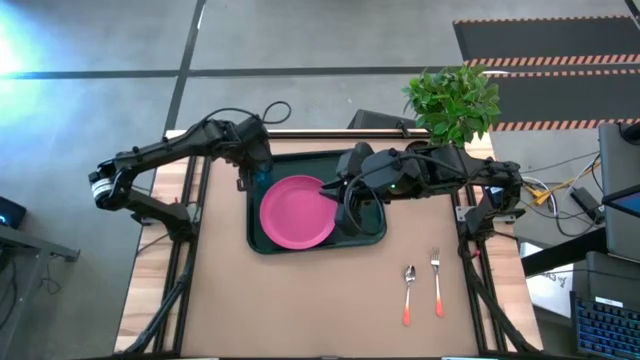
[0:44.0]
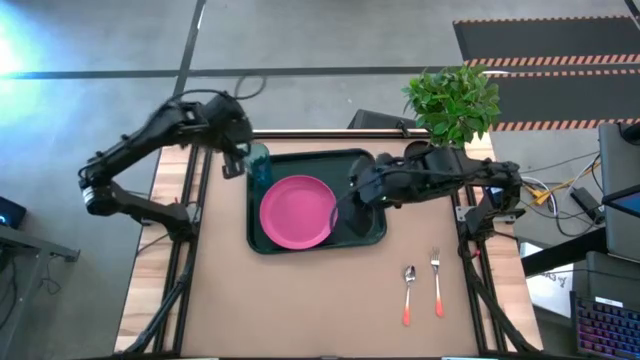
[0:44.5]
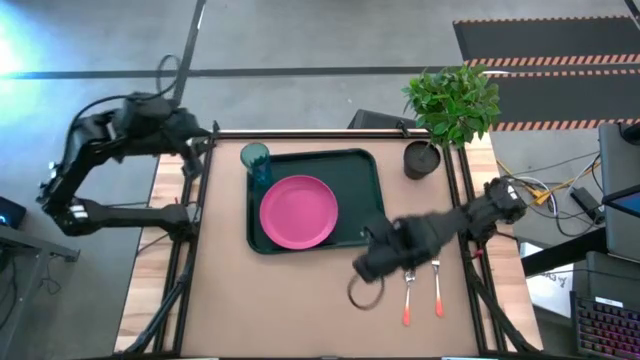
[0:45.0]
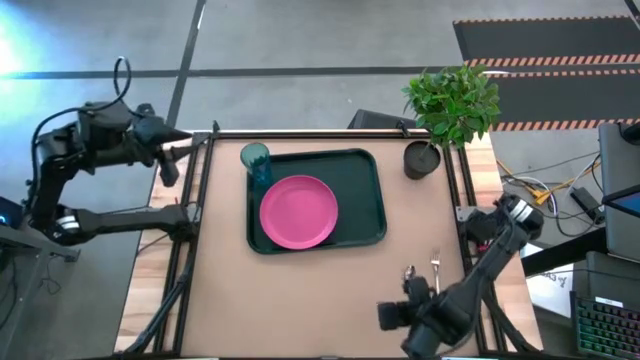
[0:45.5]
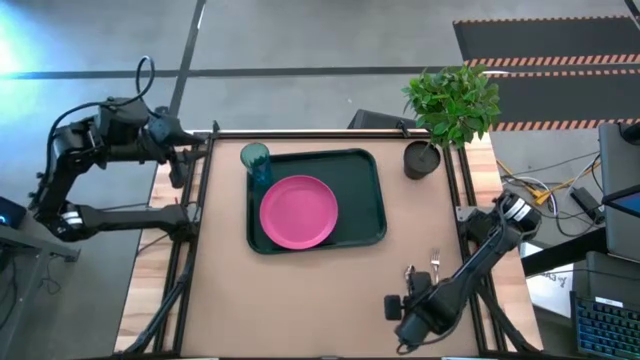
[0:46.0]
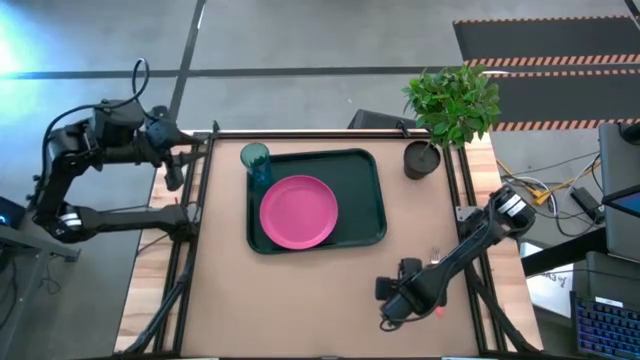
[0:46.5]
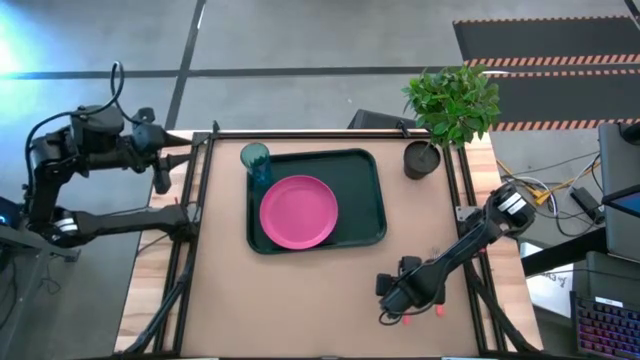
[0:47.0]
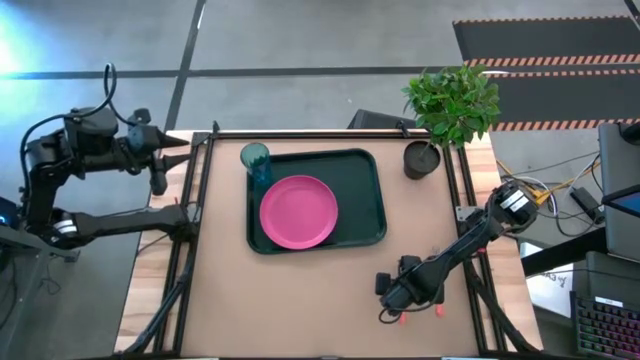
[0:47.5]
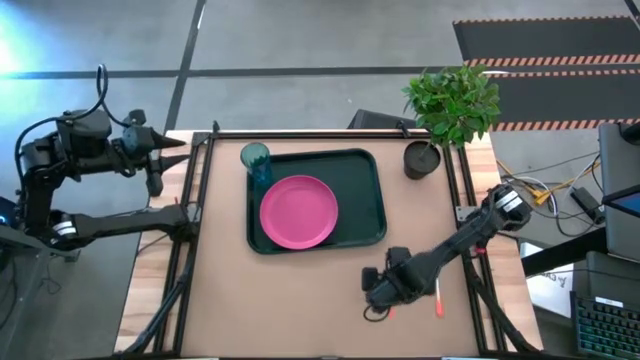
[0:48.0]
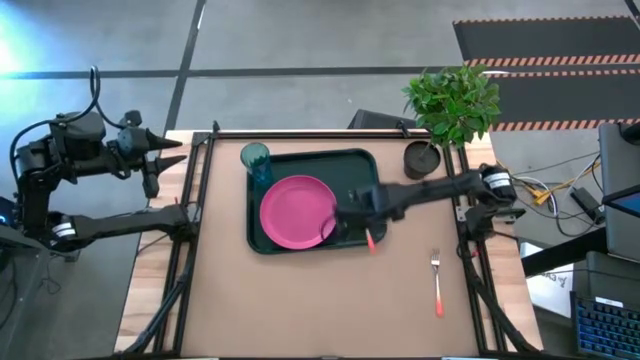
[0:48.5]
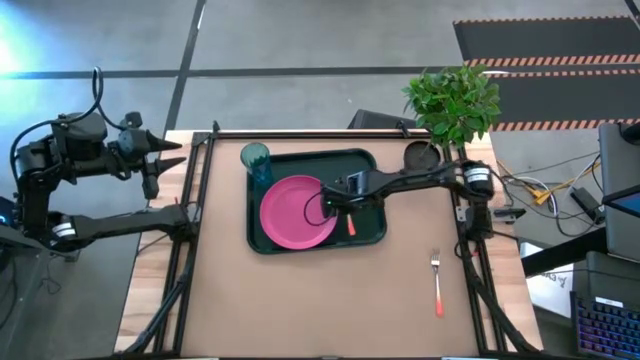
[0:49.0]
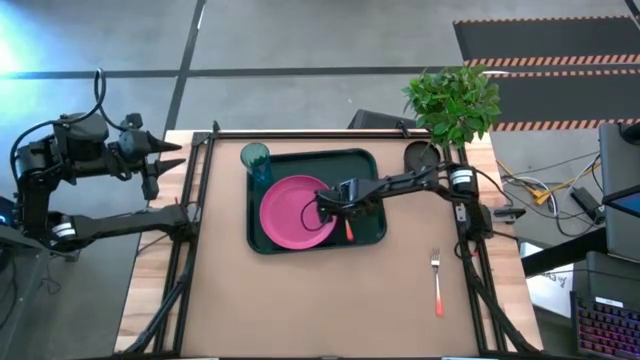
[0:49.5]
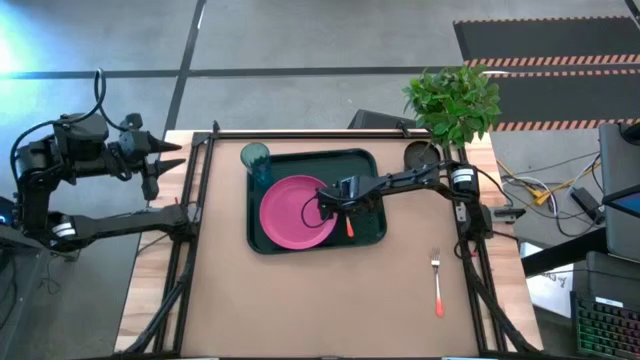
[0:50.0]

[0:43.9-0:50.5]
Task: Pick and place plate/cup/fork/spoon on tray
Put the orange spoon on the black serving tray to the right of the pink plate

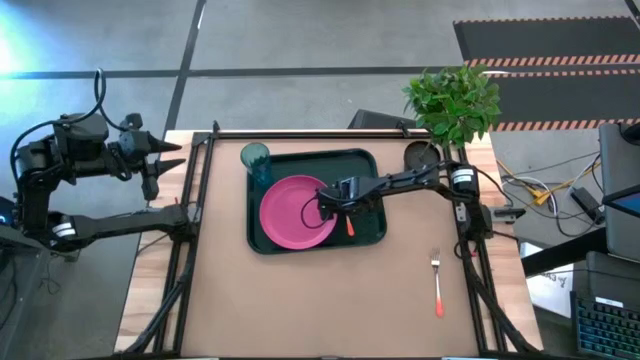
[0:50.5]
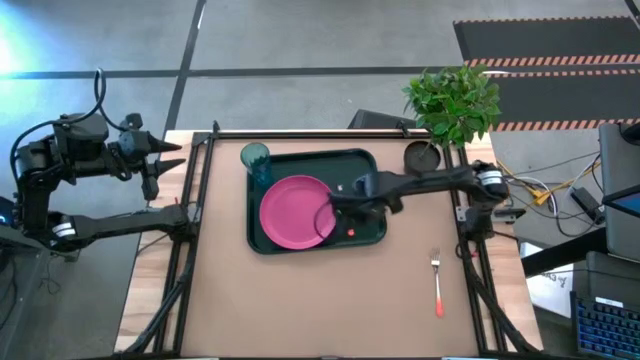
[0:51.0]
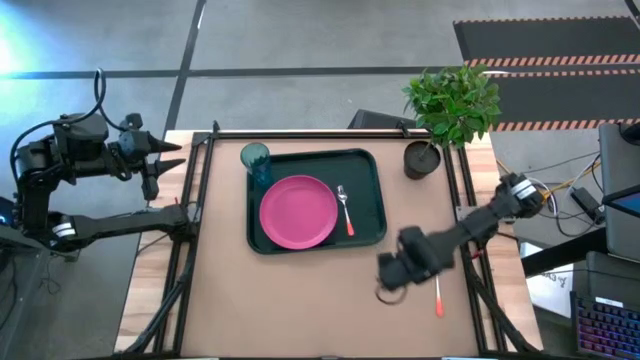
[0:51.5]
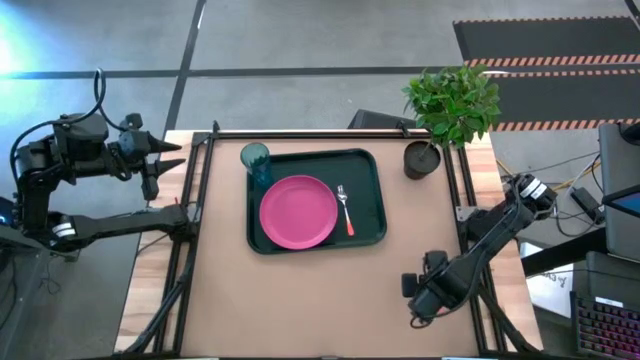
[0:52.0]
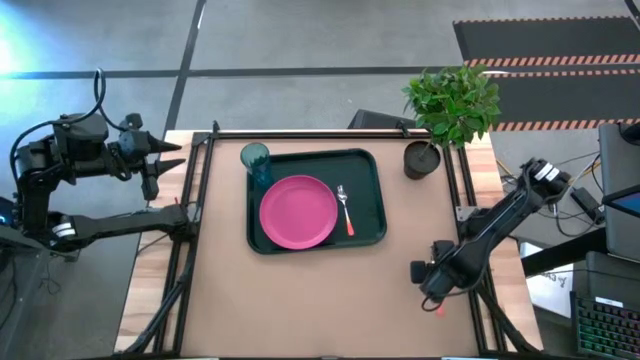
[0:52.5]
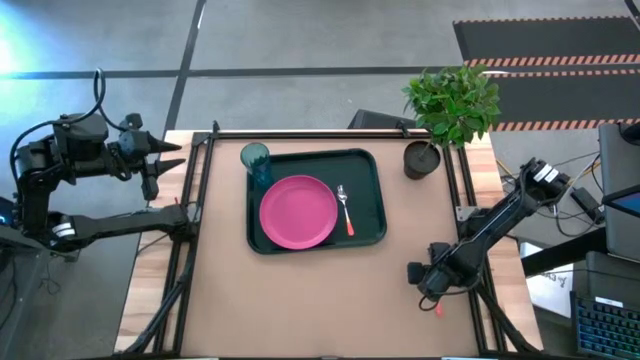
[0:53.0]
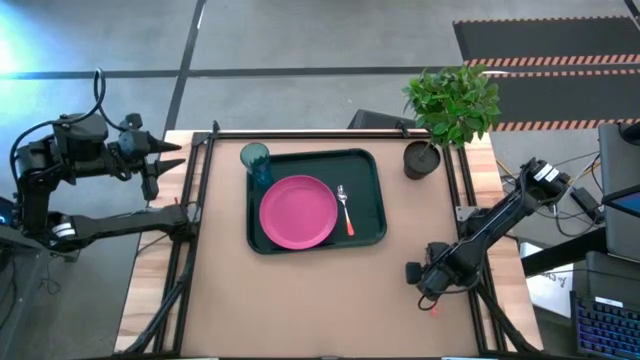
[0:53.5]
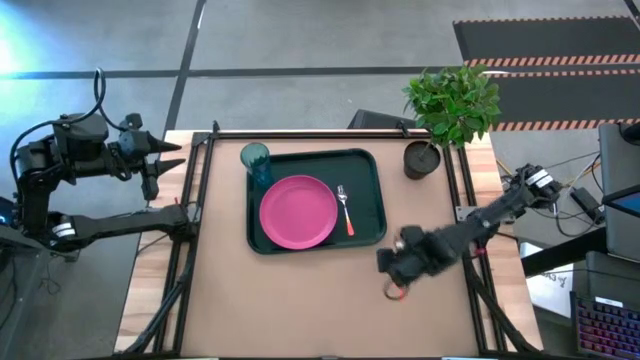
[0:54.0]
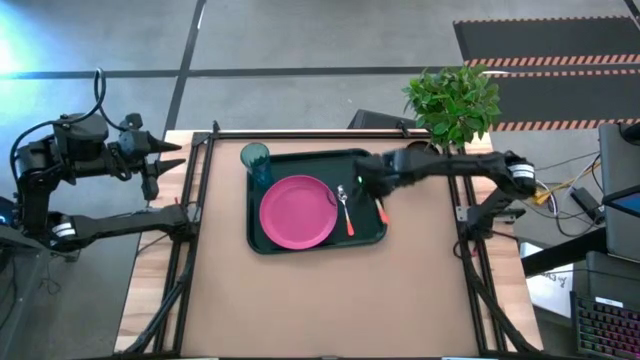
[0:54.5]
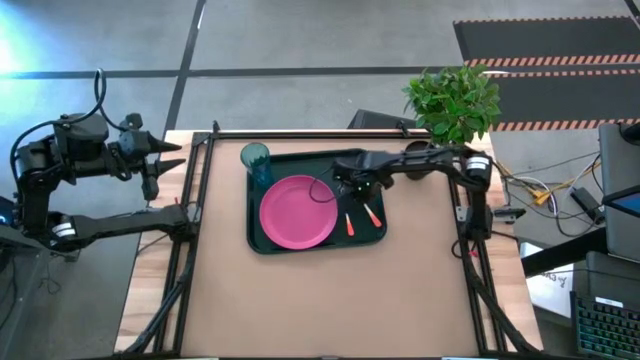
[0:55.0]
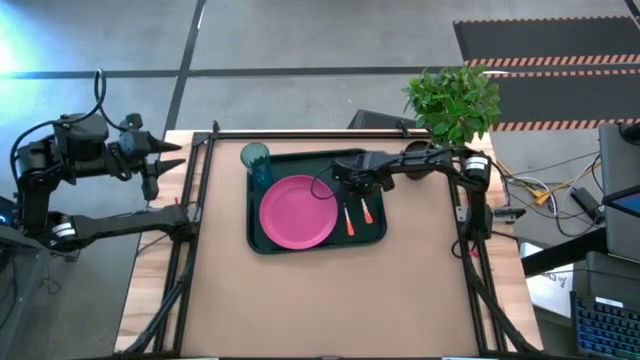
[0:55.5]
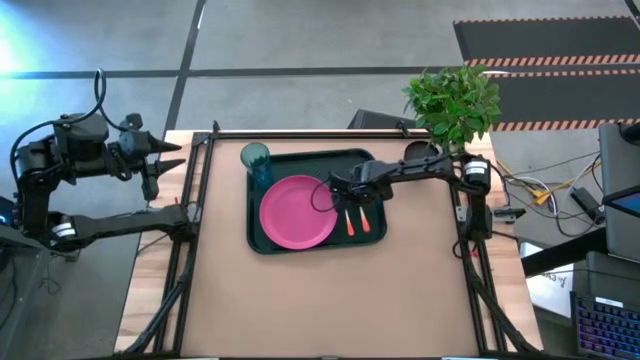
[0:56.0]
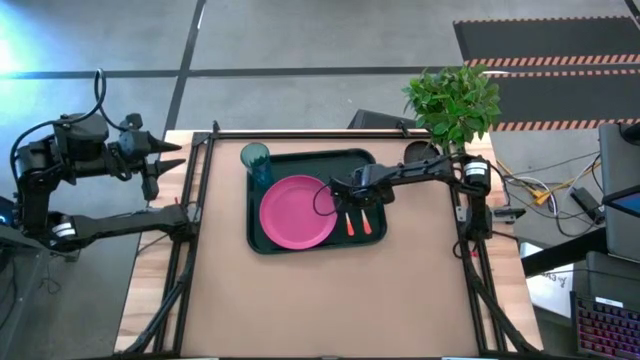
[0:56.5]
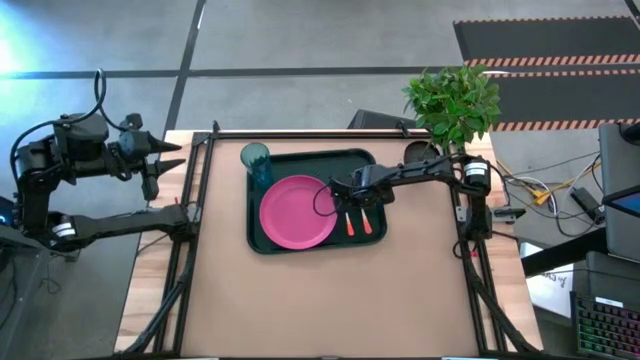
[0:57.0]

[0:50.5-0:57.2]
Put the orange fork on the black serving tray to the right of the orange spoon

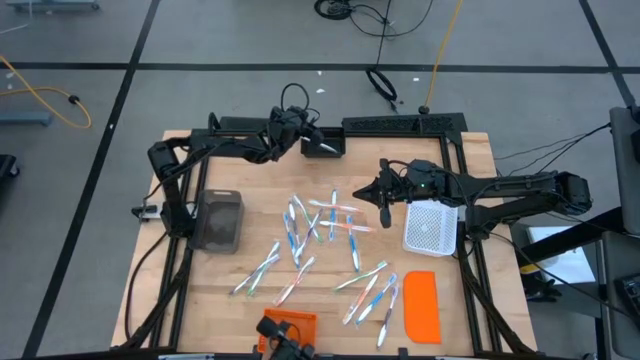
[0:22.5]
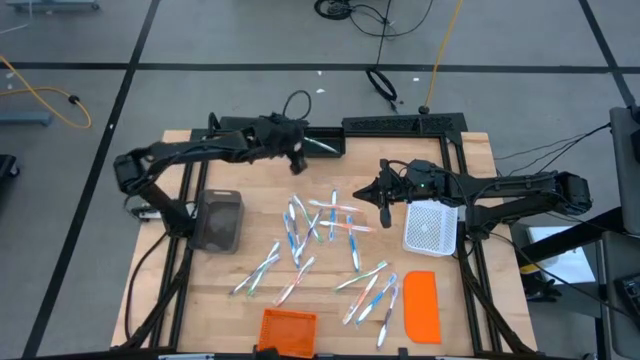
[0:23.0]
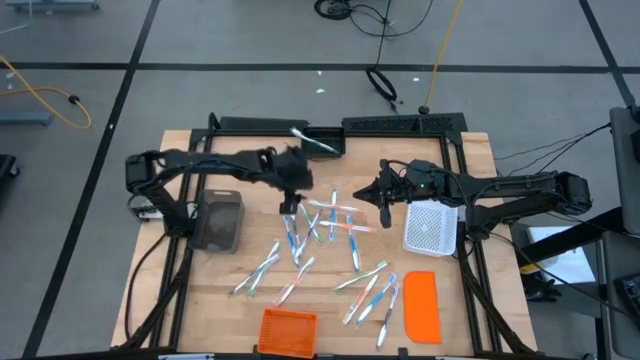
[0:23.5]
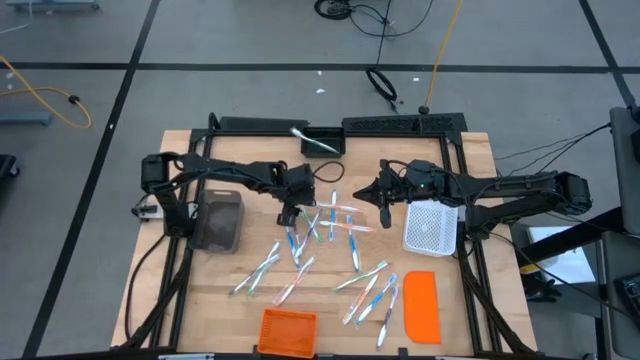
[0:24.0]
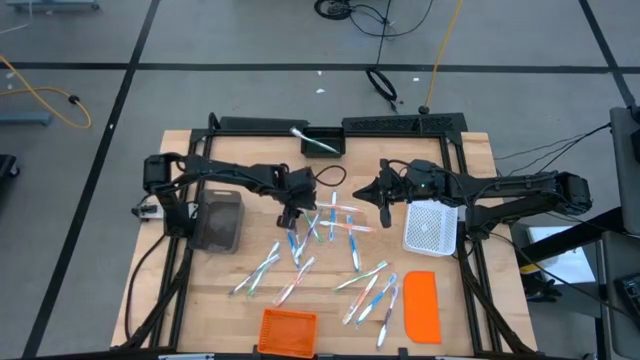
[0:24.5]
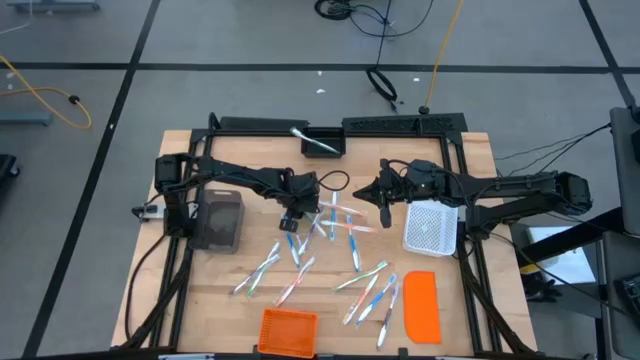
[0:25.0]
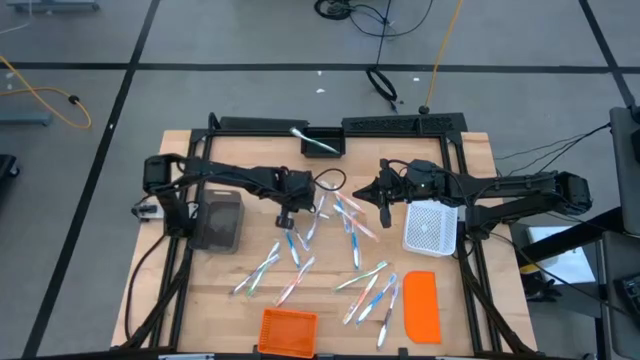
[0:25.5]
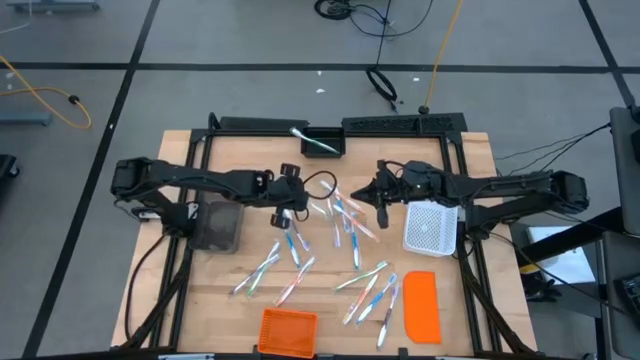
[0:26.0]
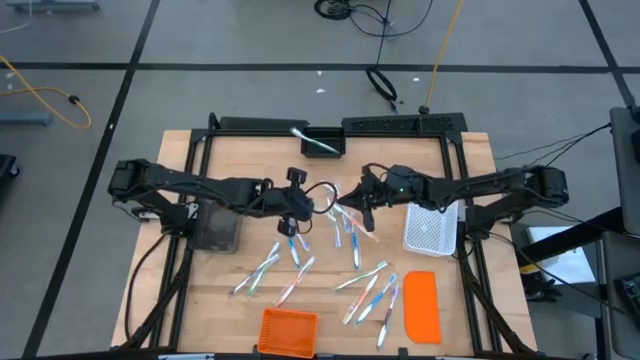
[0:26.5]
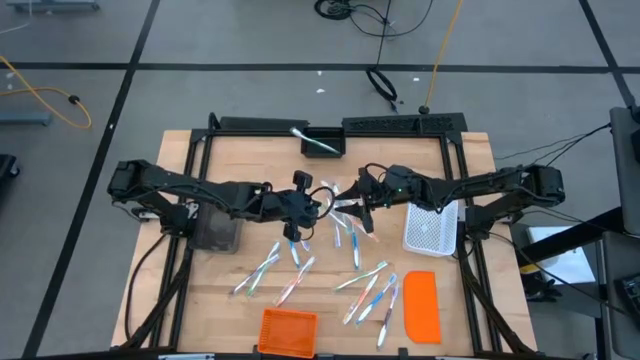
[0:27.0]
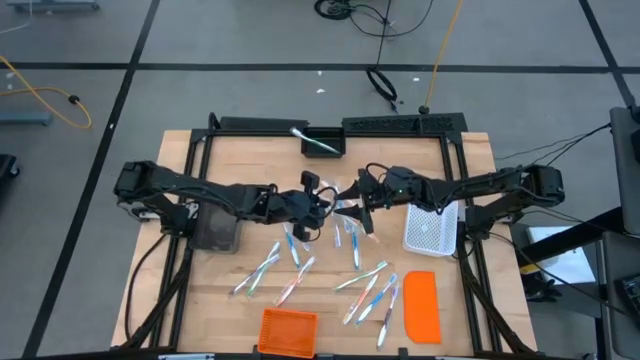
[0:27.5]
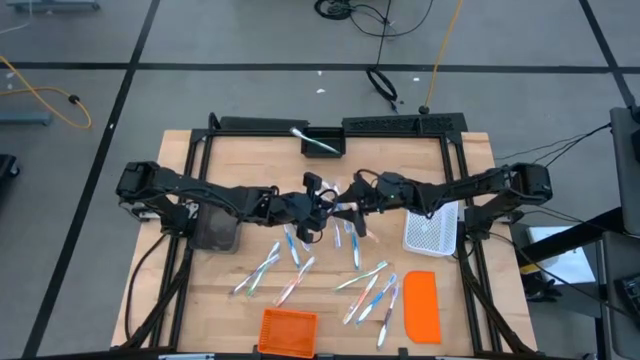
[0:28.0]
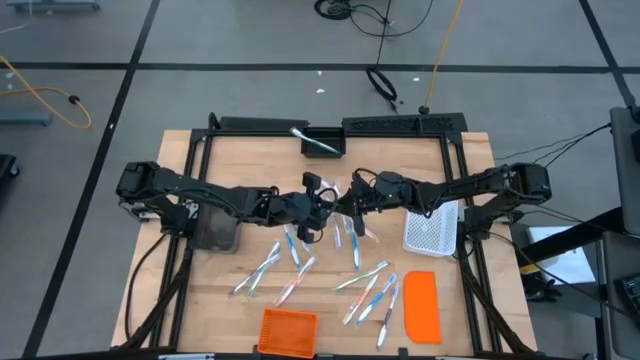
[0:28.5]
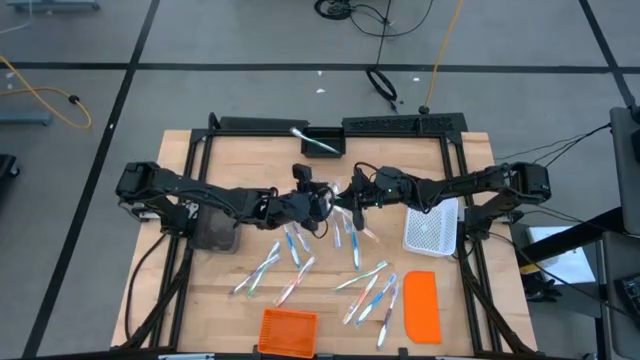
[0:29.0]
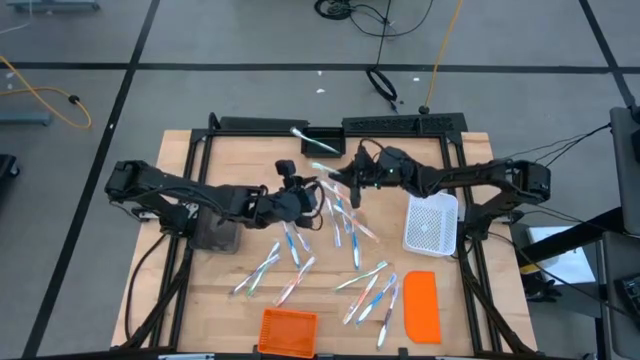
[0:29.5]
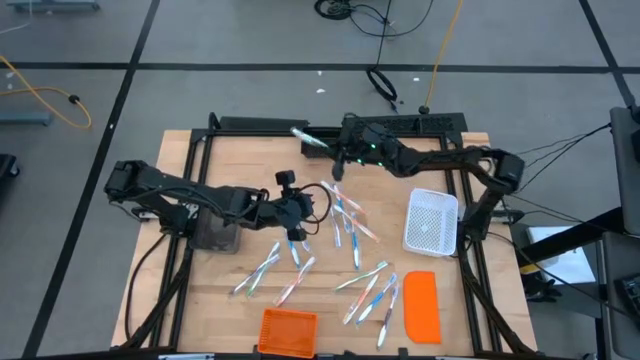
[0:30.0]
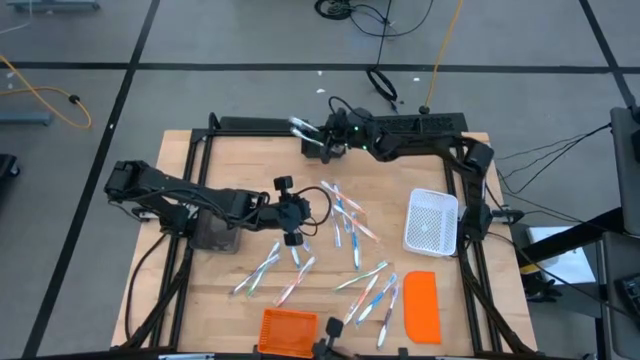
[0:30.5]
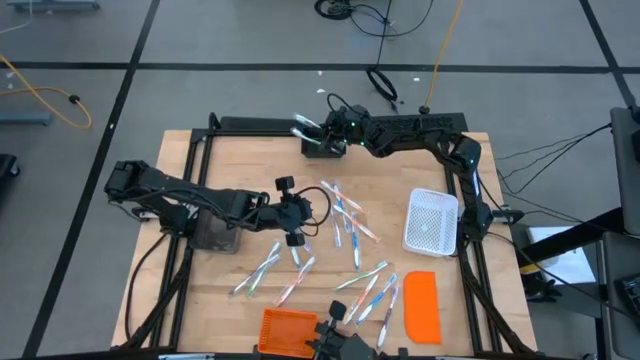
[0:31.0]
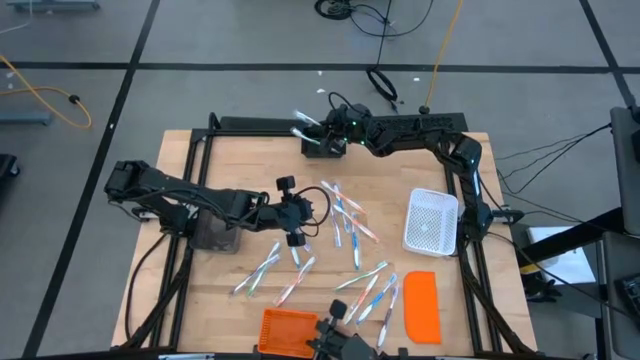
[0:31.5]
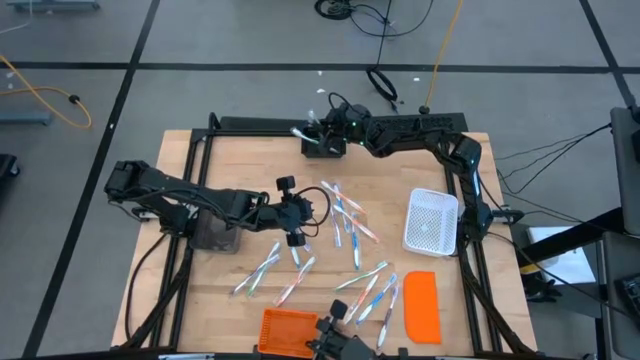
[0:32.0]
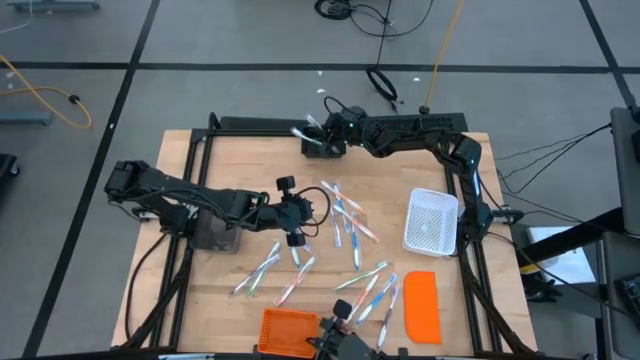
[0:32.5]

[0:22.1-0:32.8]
Task: Pick & Place Toothbrushes
Put the green toothbrush into the black bin
